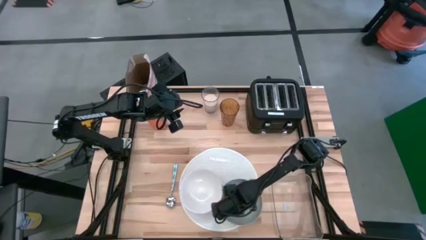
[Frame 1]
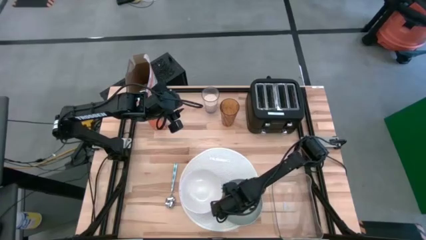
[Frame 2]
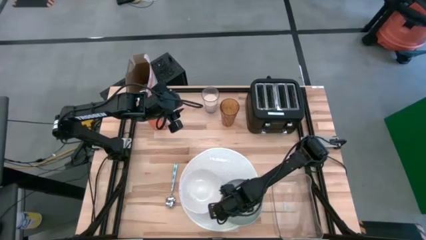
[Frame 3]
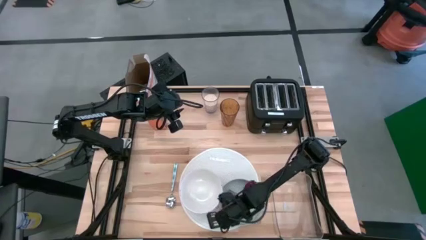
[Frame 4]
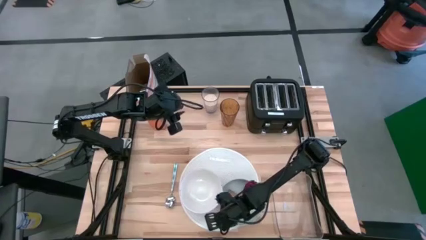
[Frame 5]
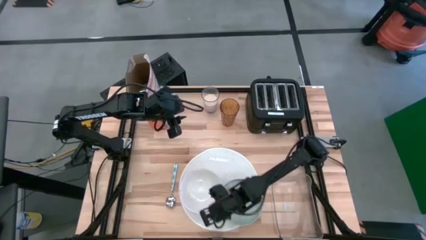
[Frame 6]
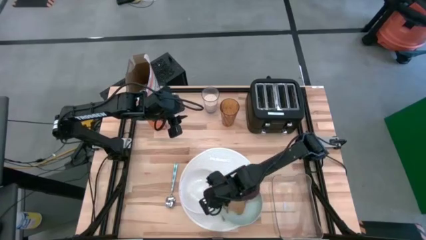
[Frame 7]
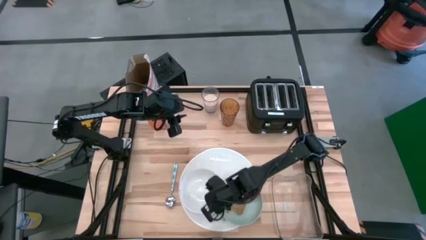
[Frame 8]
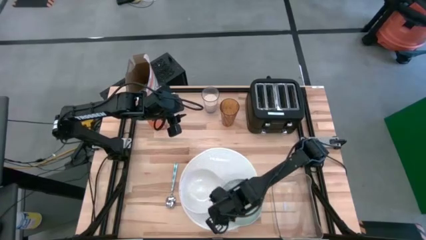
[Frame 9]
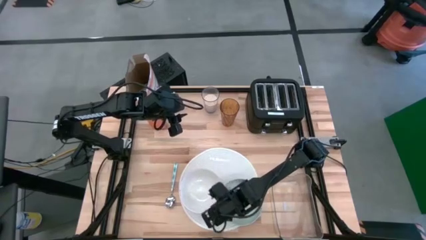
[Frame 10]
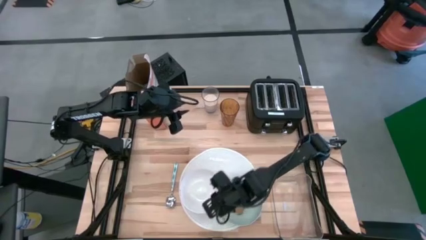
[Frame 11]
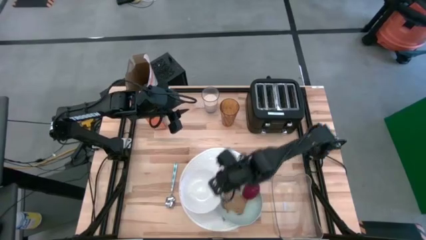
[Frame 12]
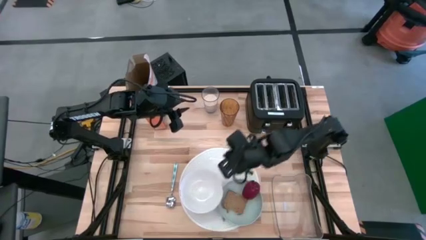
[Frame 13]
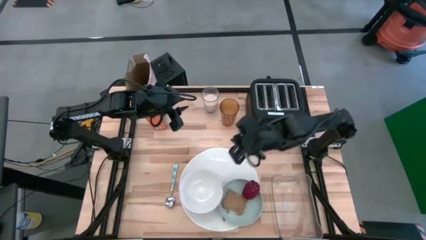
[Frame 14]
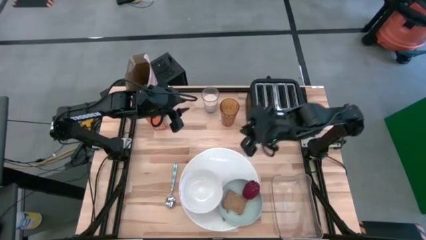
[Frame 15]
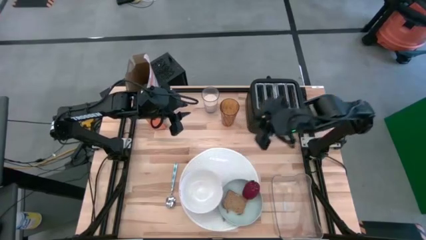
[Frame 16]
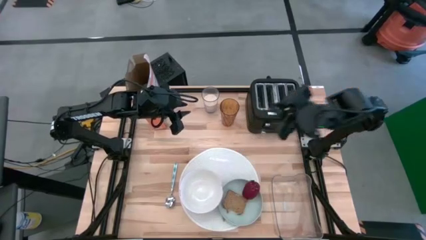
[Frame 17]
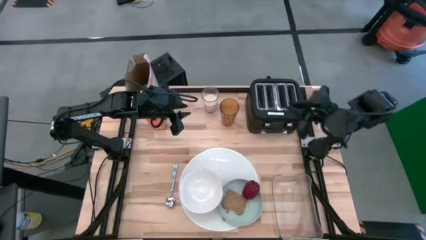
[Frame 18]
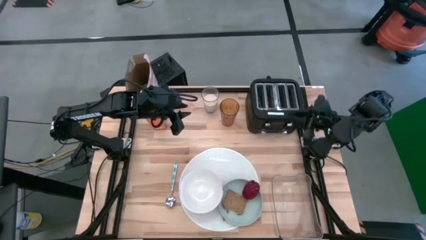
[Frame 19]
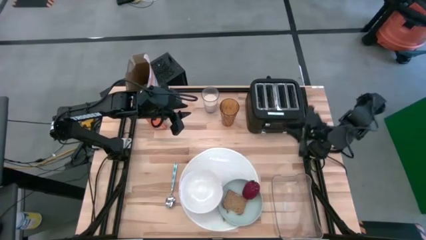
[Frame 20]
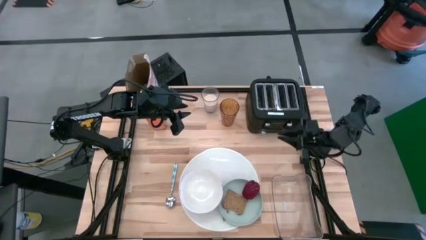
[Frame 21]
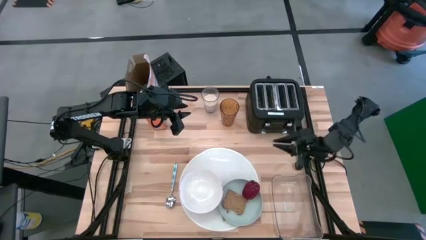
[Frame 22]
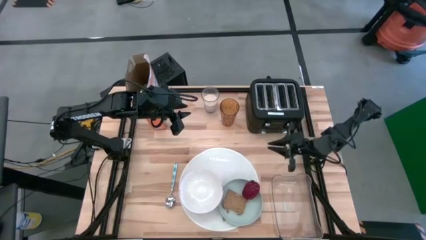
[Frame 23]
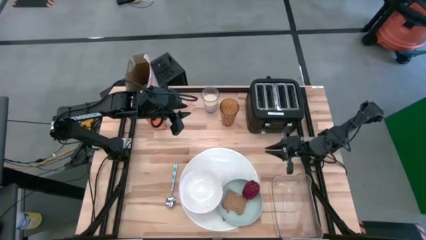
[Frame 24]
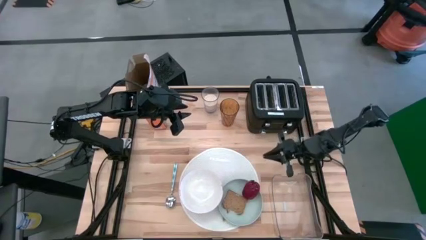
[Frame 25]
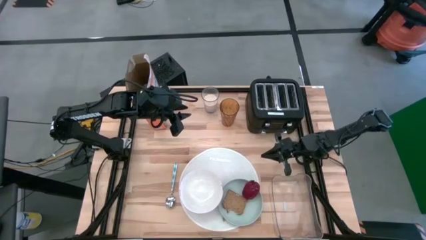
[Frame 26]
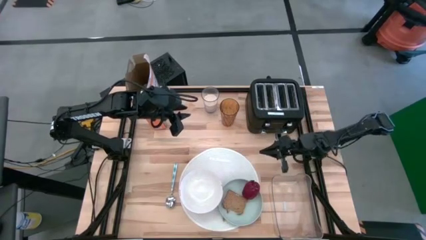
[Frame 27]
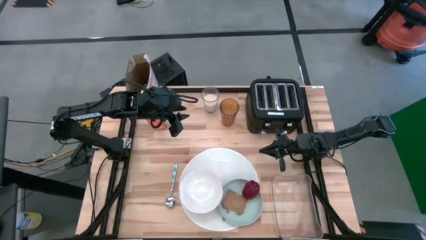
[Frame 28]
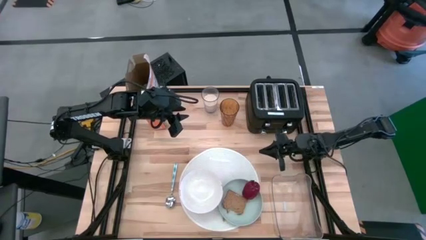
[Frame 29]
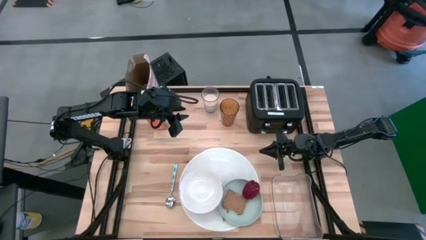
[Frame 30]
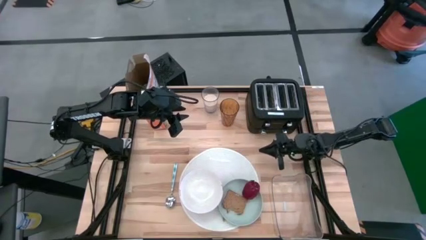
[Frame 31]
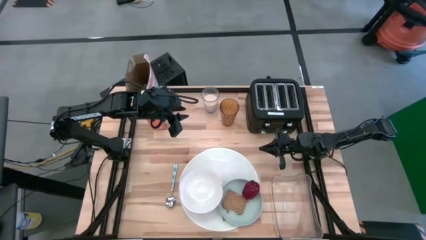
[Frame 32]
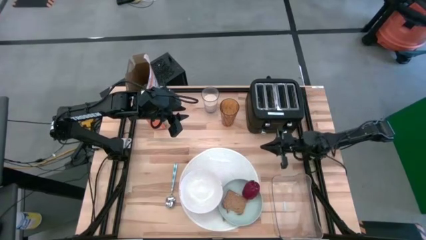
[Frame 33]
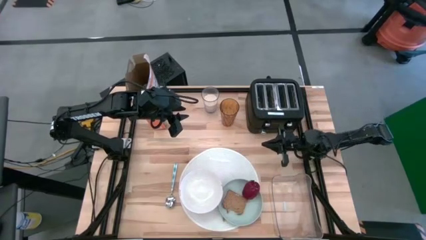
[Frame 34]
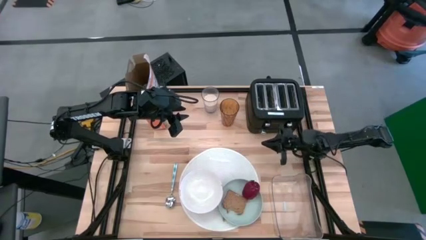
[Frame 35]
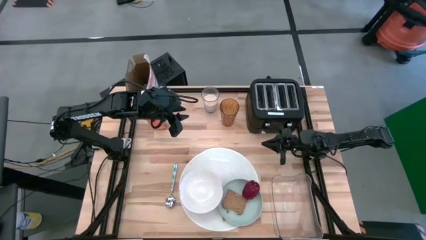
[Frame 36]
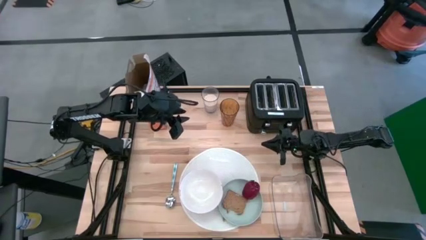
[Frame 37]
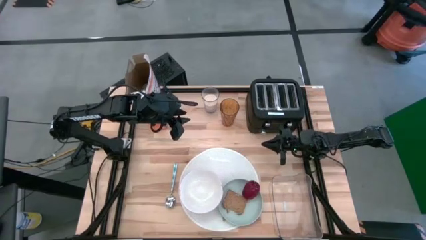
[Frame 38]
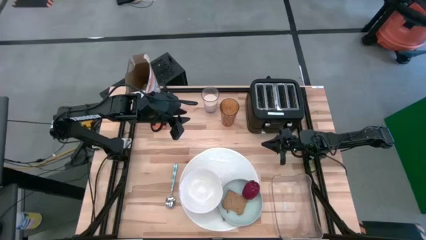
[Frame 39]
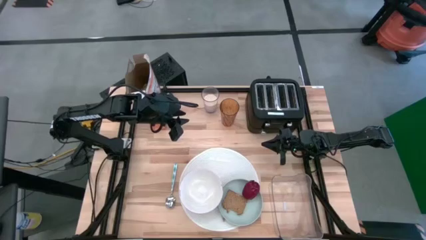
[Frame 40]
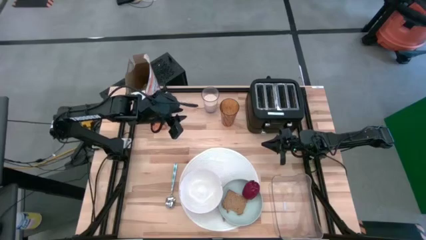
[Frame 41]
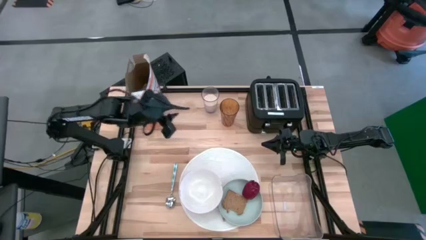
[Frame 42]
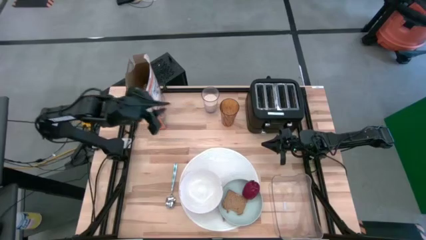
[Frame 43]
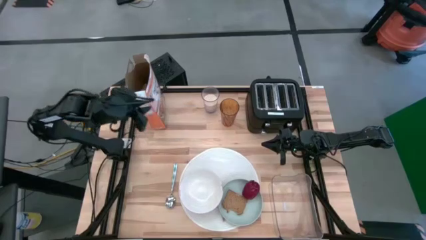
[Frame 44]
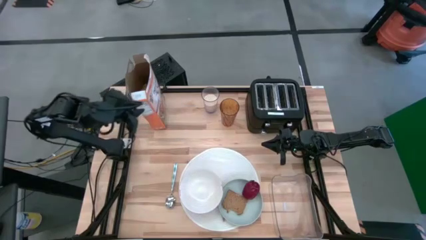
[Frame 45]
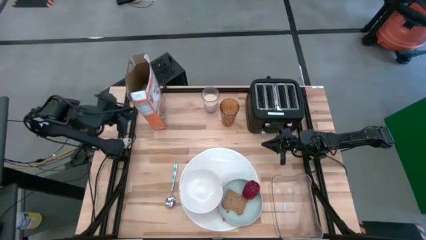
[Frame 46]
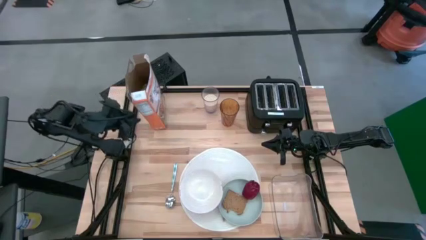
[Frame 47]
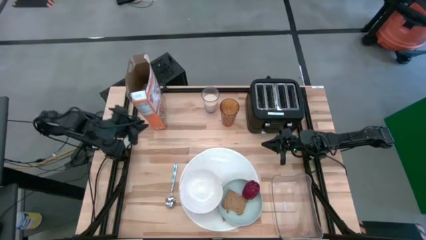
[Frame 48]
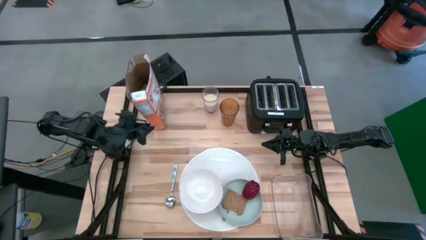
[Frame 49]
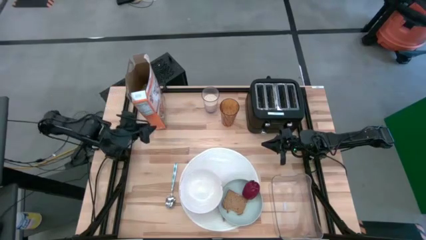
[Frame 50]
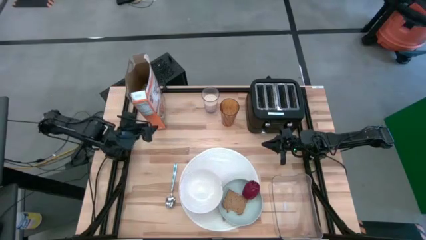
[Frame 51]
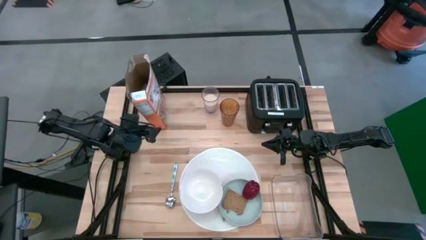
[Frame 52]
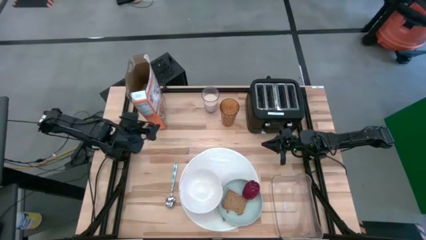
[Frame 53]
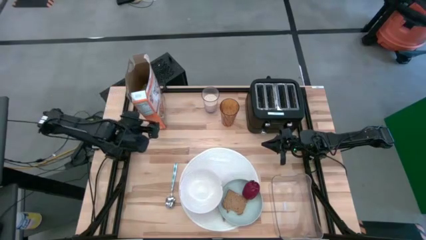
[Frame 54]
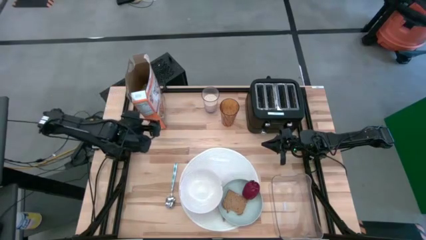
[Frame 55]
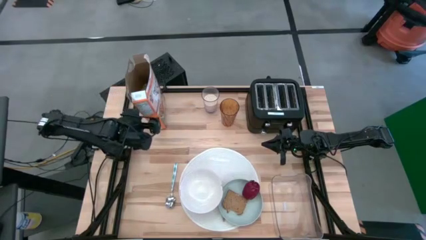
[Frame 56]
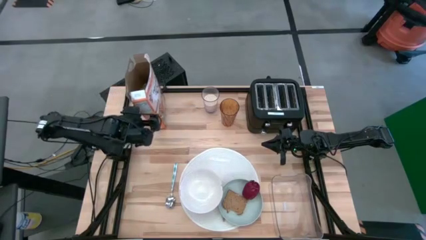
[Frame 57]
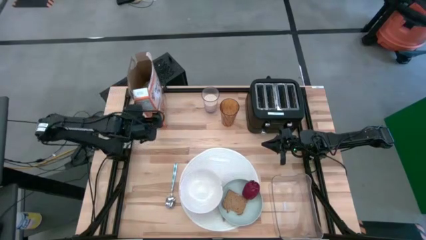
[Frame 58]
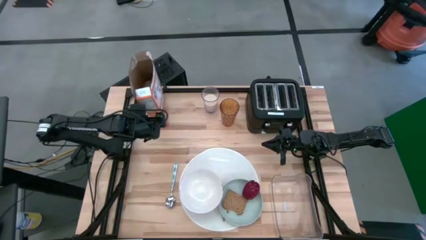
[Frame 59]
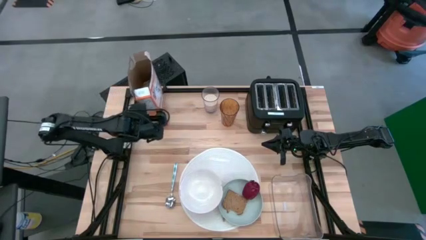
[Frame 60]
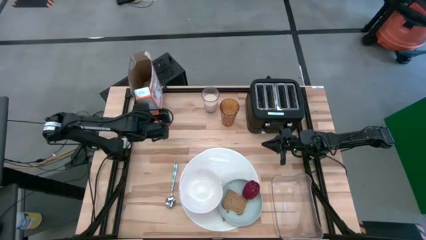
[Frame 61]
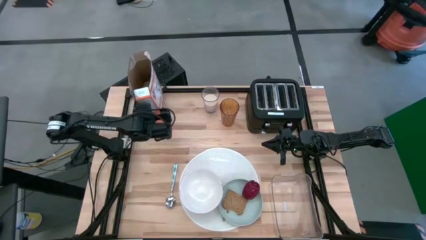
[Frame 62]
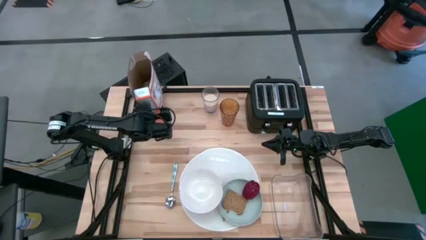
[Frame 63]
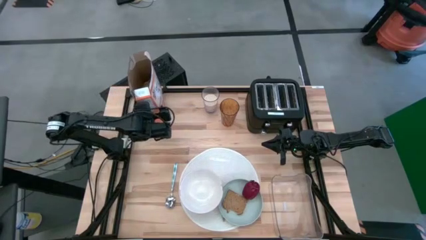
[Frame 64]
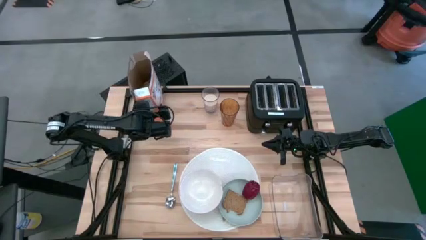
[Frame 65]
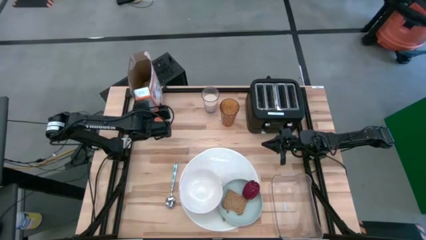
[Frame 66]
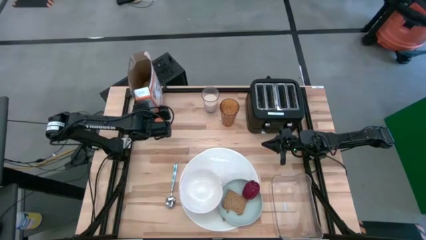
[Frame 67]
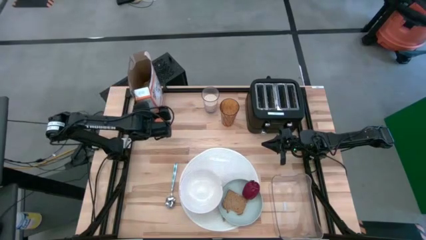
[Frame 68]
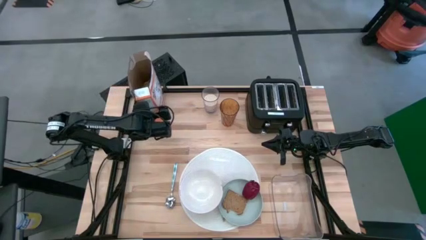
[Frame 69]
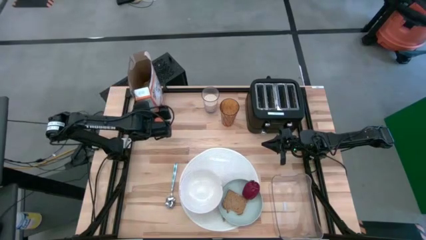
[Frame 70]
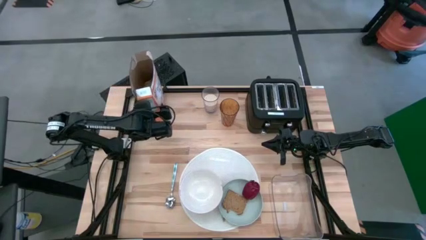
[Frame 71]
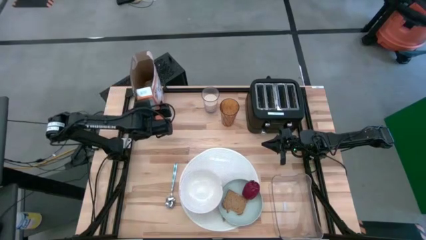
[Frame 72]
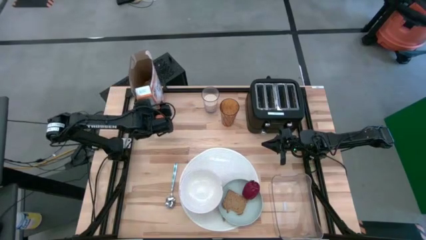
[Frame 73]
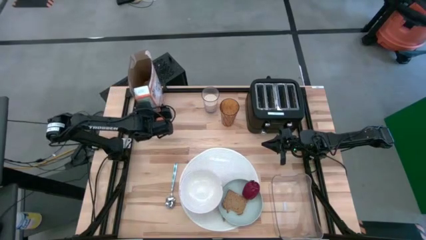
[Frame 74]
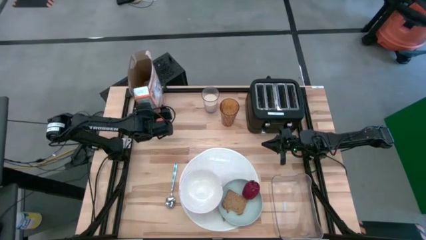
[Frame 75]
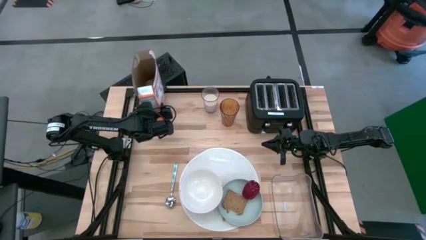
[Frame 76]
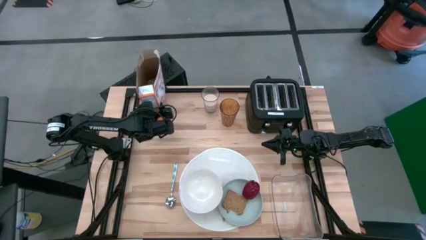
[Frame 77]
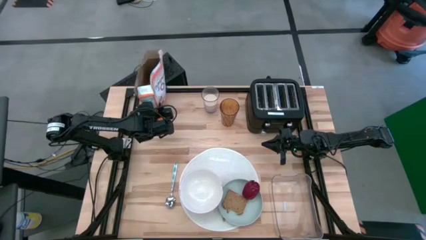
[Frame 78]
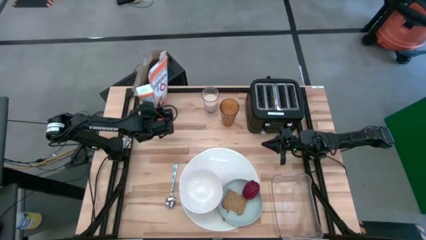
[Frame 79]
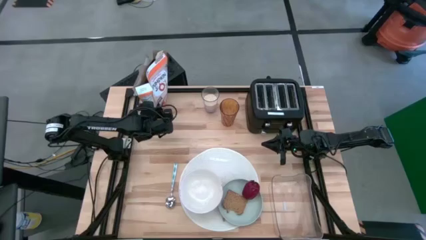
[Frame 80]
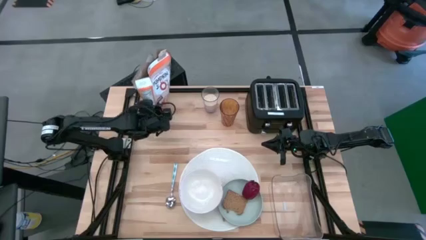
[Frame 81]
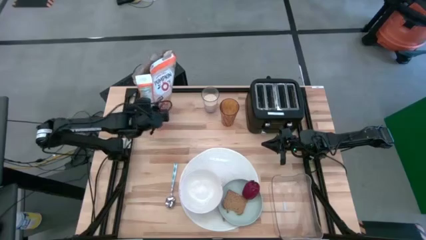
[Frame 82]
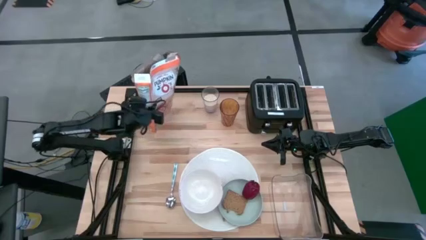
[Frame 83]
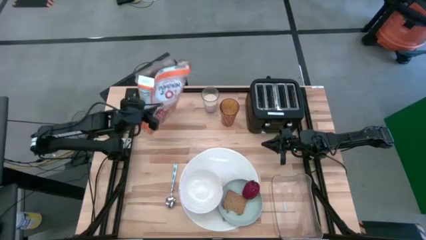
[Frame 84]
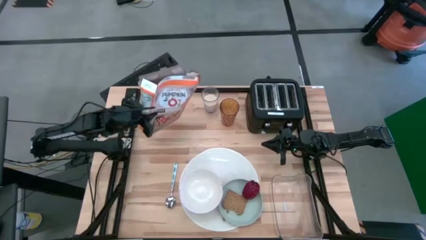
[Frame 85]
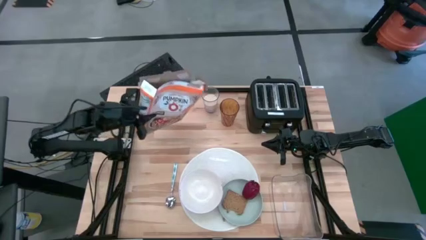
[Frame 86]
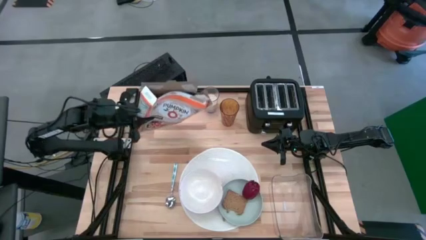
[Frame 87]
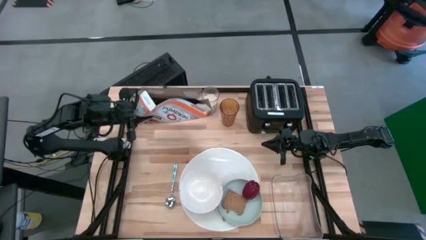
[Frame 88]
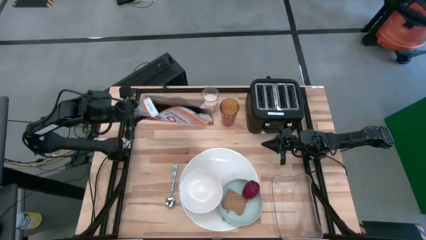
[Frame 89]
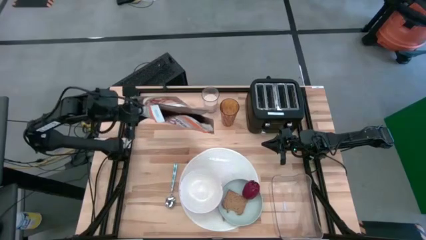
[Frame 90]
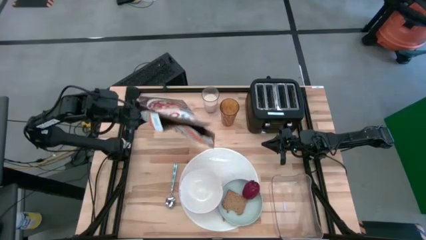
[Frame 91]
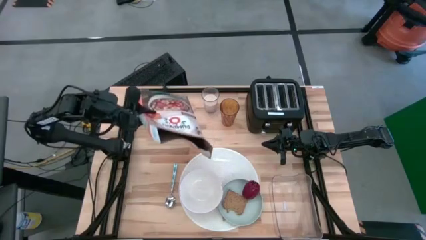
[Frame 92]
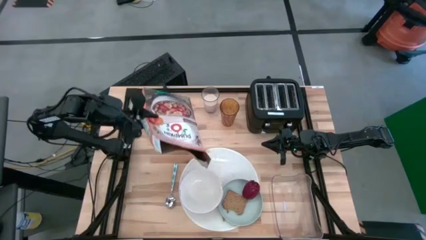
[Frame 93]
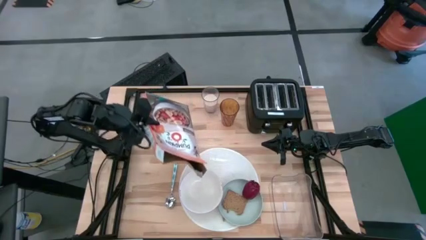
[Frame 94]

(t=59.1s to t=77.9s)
Task: Arrange a breakfast setting
Pour the cereal into the white bowl
